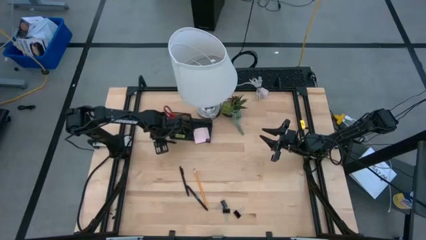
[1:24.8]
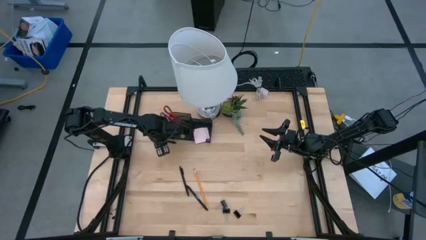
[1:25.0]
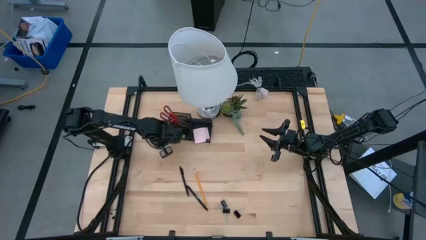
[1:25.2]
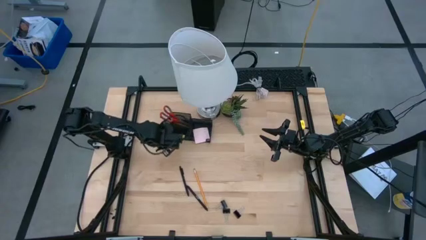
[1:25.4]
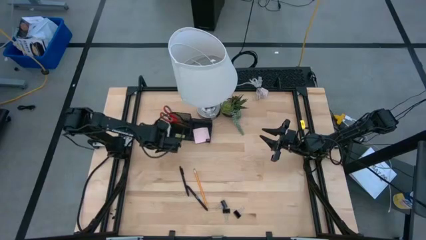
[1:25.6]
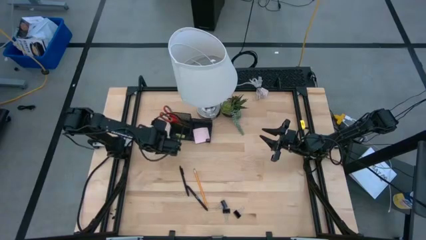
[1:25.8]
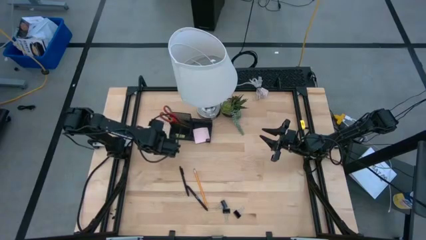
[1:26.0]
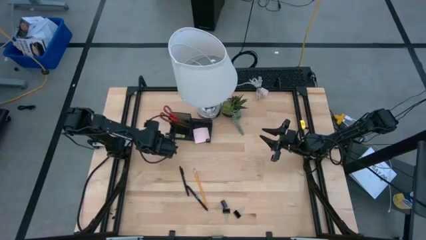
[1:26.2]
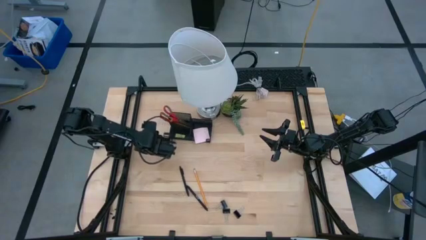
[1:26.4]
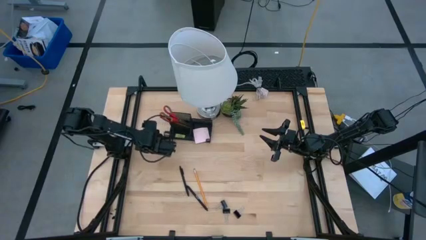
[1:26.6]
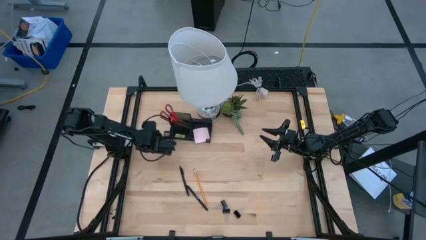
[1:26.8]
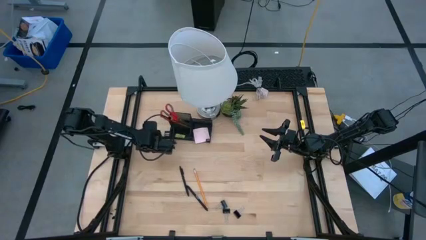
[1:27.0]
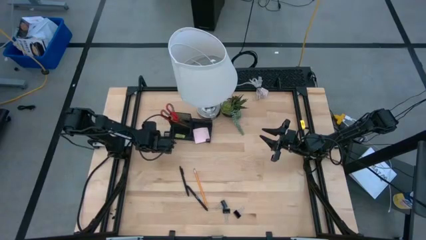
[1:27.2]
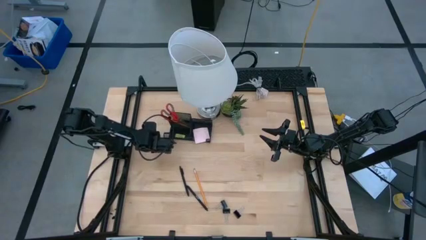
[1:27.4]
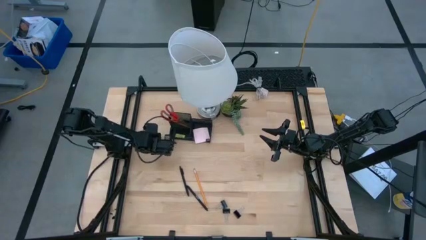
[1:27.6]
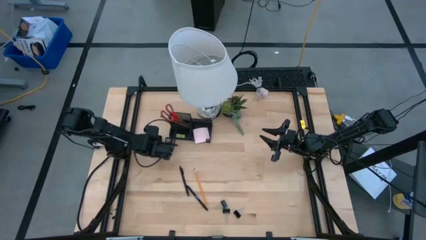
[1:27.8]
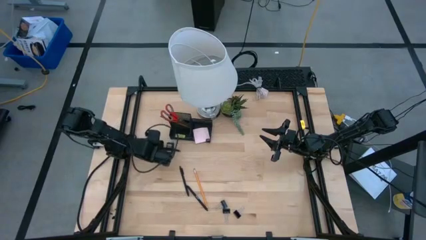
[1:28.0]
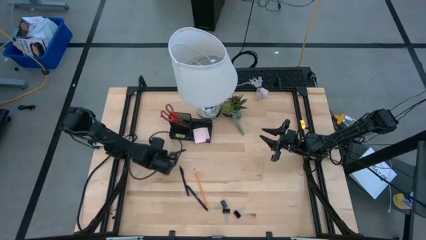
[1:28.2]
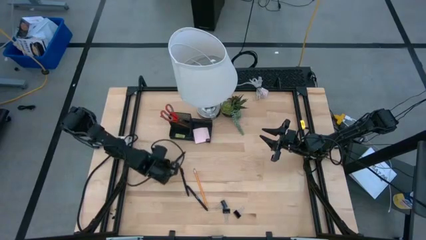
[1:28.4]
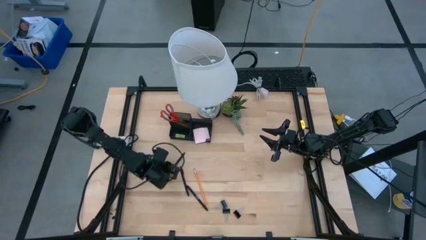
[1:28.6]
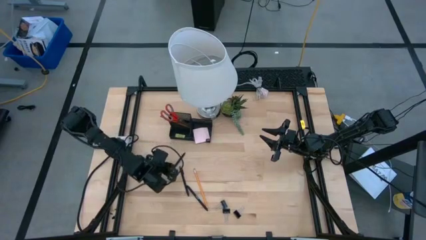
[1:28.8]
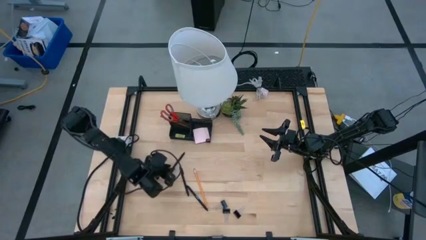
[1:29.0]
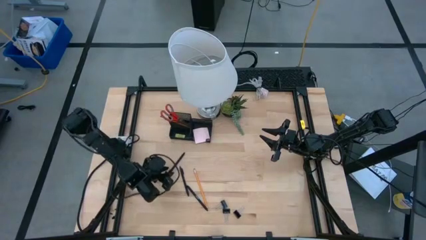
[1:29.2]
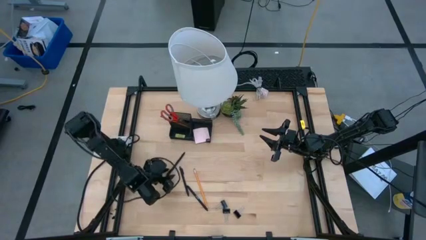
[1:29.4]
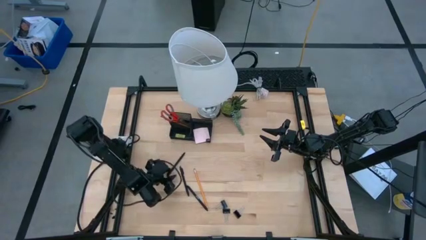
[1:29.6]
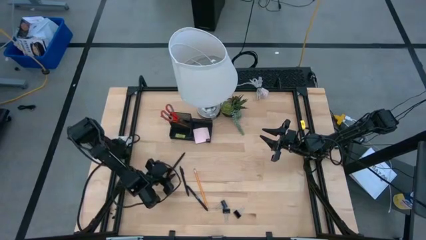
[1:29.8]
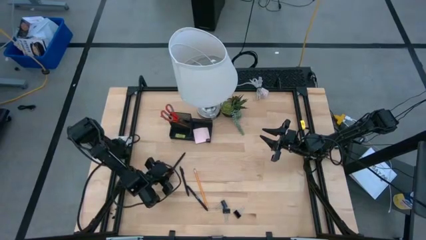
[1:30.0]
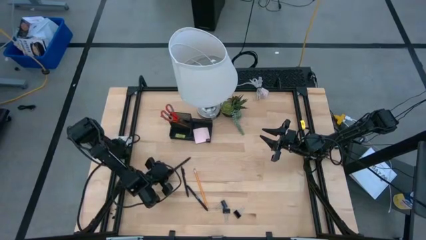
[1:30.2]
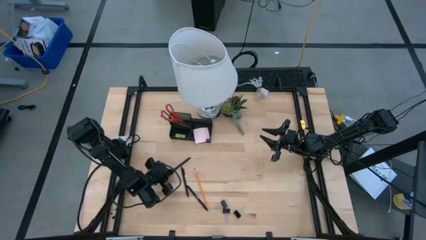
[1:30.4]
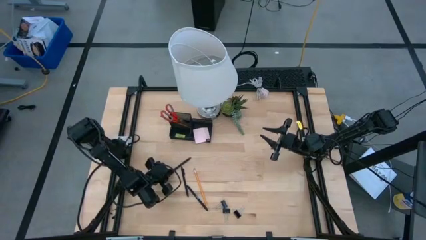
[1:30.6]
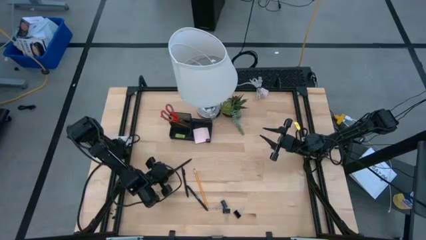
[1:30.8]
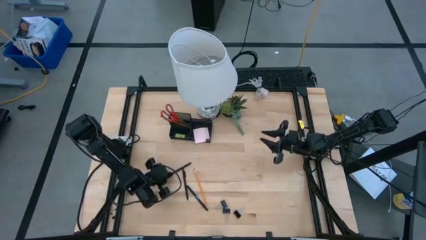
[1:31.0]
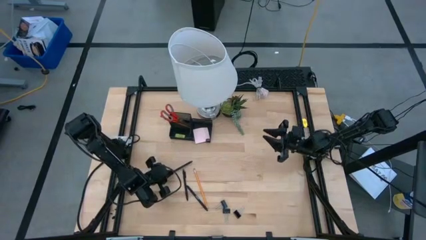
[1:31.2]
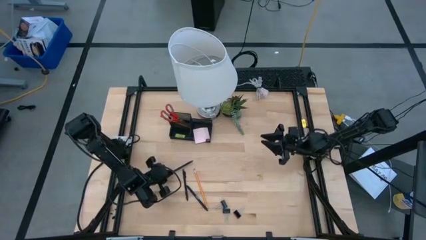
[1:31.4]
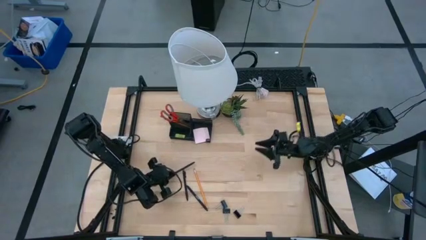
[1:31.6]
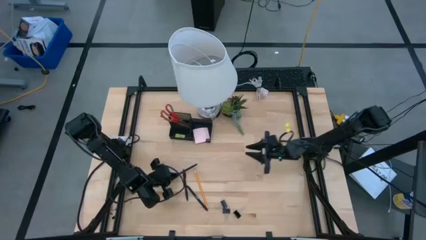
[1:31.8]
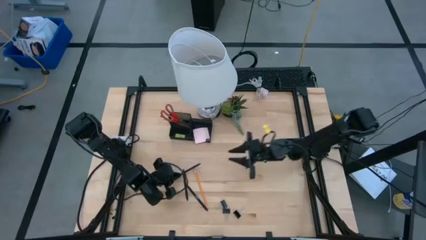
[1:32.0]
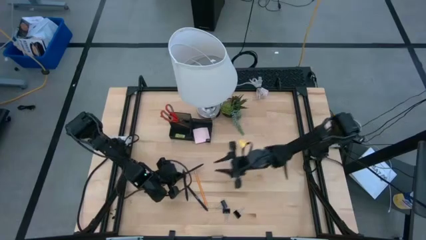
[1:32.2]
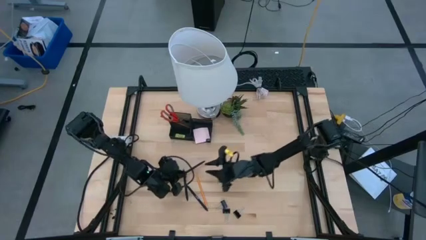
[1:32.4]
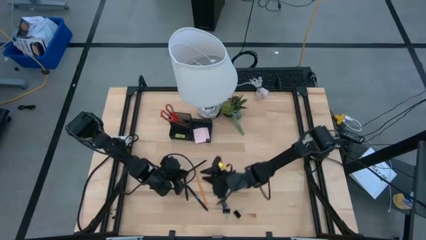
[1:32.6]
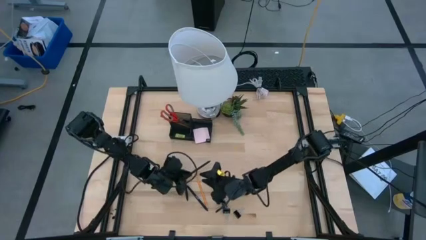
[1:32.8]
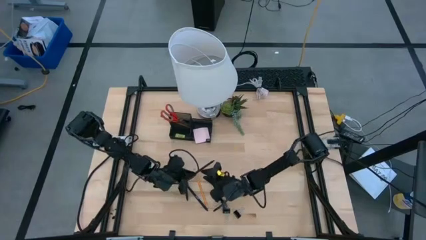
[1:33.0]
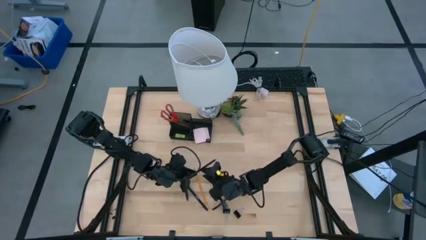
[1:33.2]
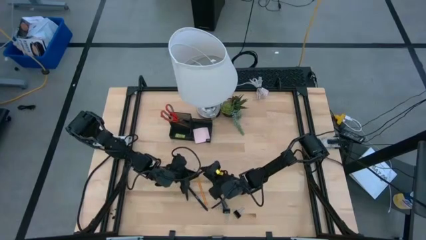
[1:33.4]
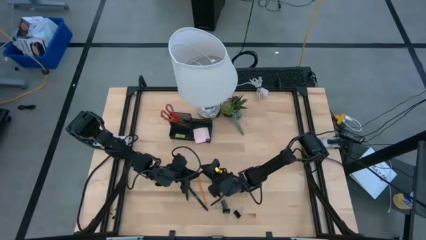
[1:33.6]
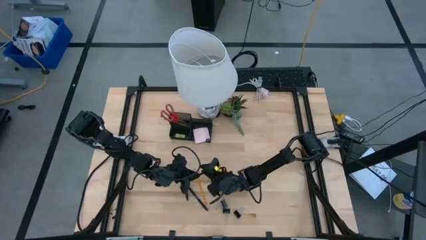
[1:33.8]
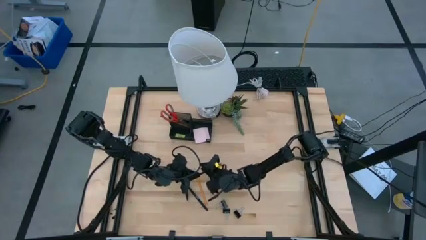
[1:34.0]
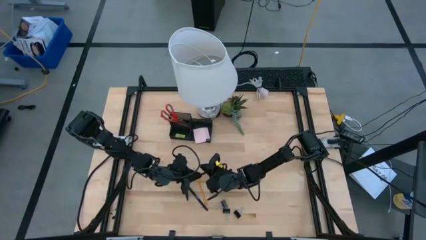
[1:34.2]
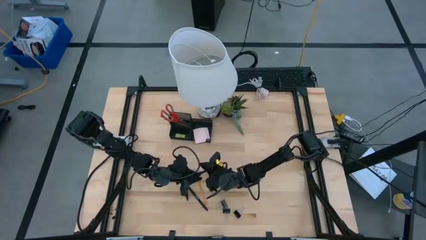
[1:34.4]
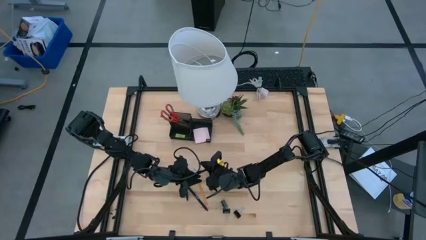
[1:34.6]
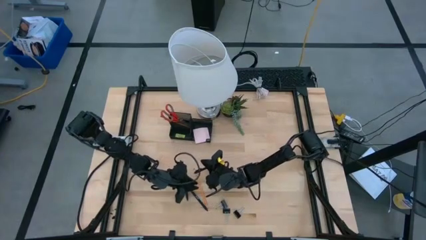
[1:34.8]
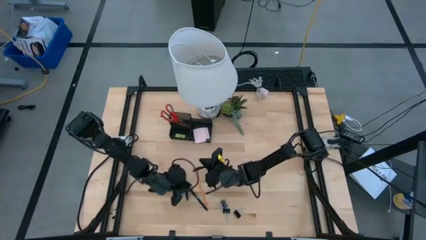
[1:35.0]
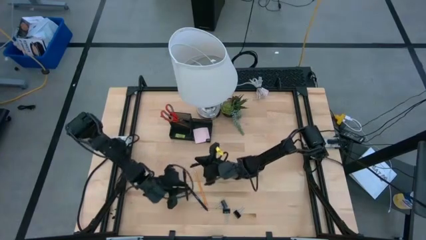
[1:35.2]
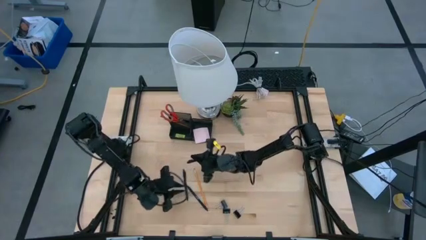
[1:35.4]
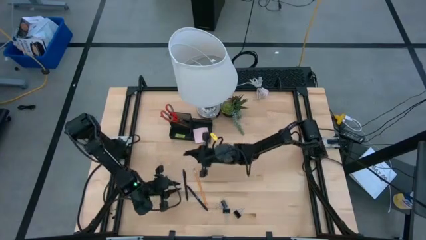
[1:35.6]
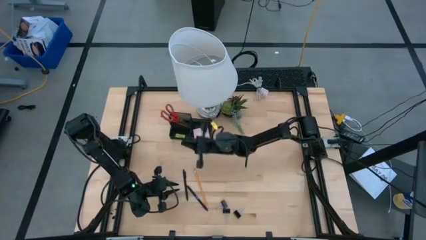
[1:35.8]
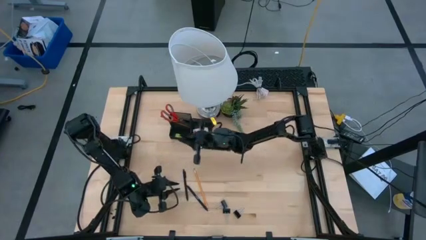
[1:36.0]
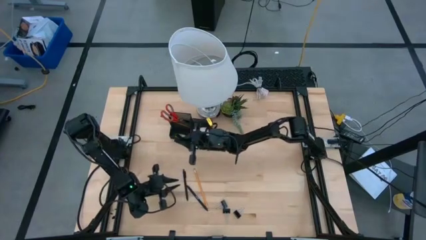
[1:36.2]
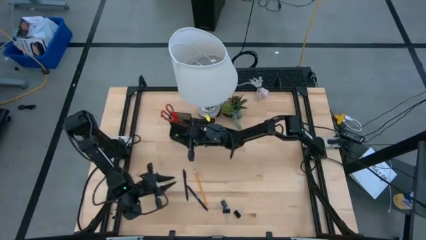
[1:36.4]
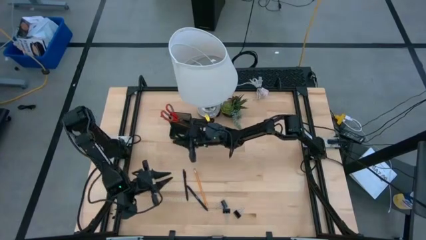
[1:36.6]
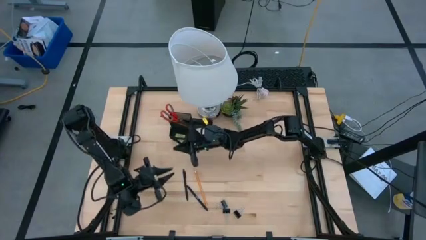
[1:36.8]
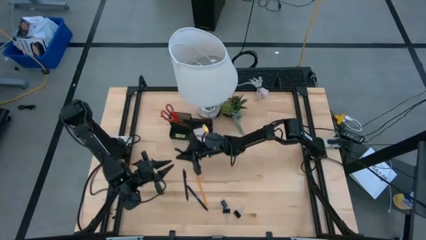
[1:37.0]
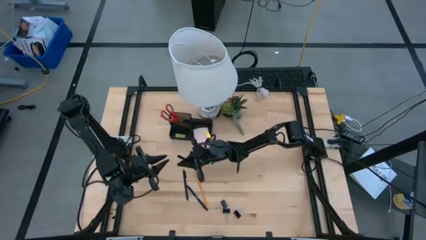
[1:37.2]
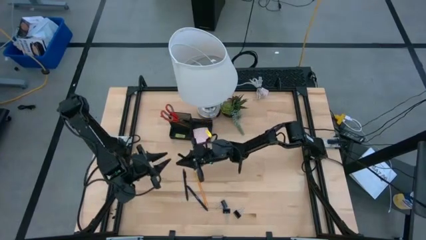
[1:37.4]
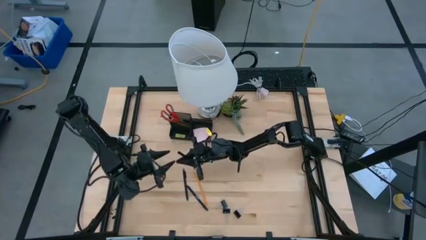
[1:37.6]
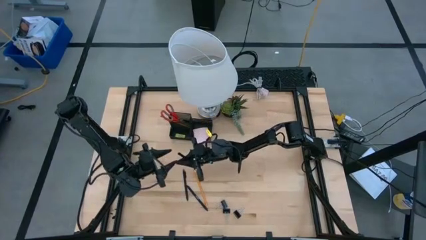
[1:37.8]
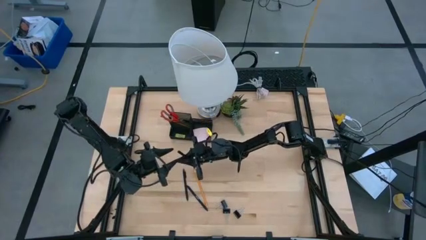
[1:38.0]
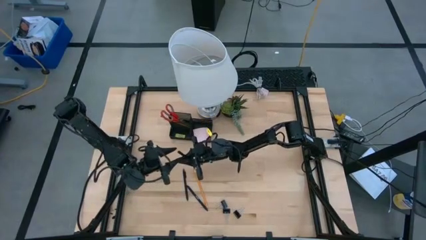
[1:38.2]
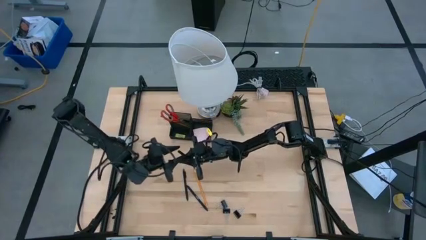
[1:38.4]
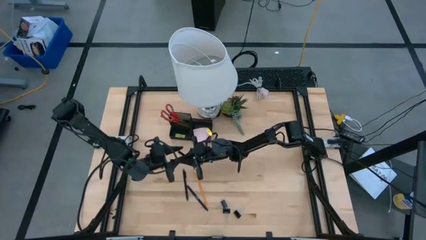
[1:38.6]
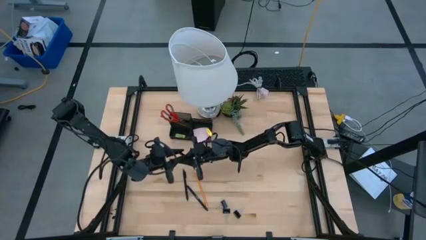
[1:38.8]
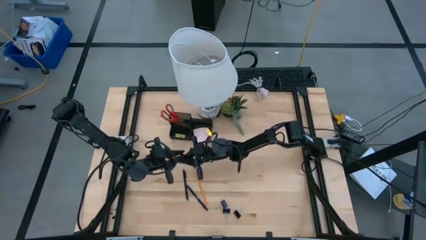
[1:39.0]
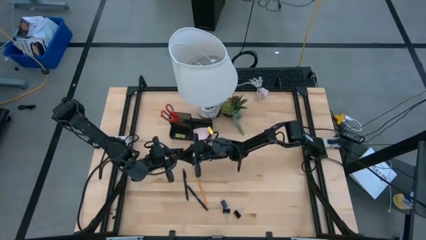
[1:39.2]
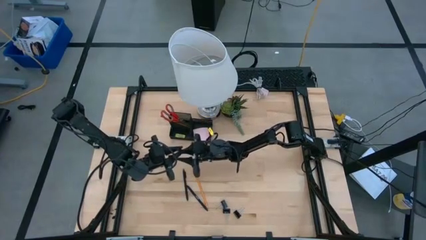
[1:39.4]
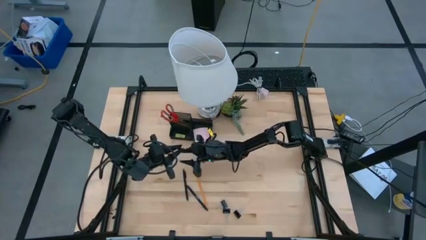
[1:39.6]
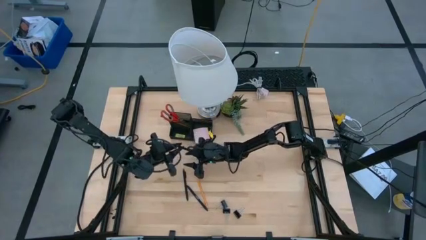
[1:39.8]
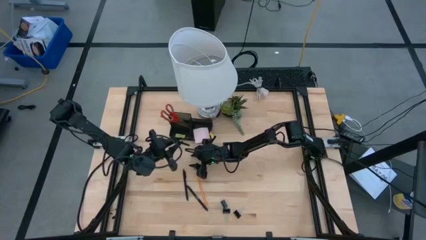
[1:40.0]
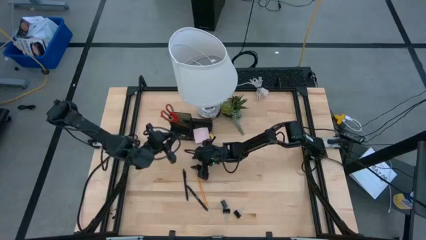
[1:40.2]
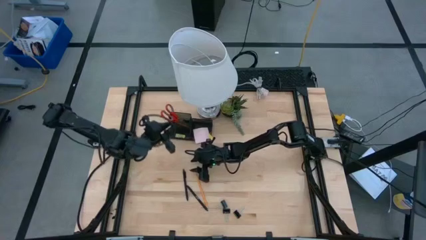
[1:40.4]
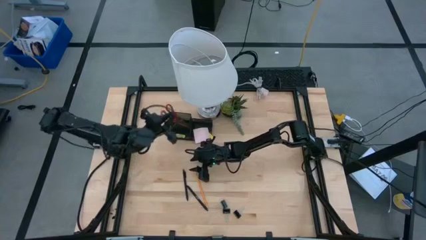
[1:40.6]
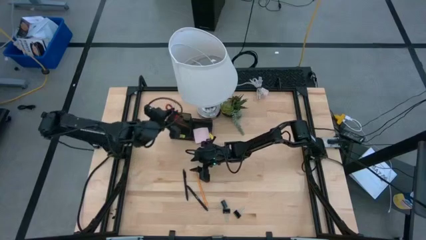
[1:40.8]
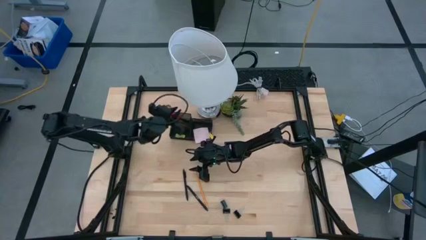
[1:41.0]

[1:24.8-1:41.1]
Task: Pick and place office supplies into organizer
Put the black pen into the black desk organizer

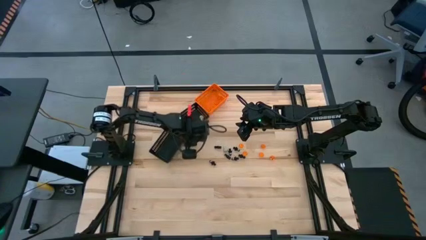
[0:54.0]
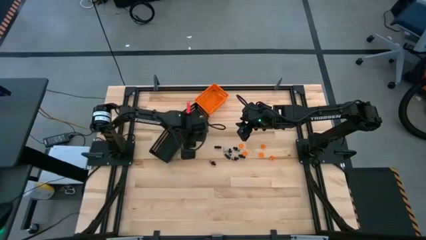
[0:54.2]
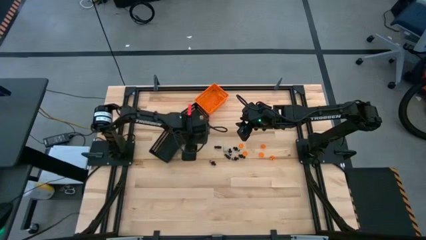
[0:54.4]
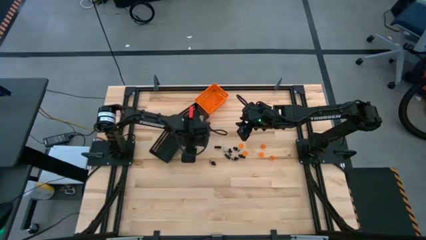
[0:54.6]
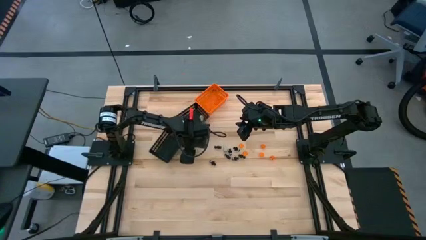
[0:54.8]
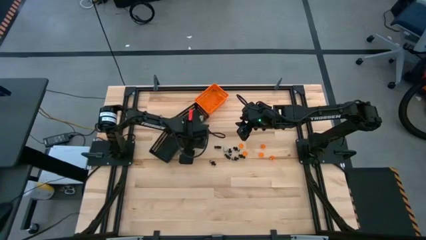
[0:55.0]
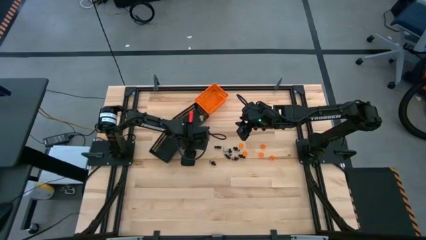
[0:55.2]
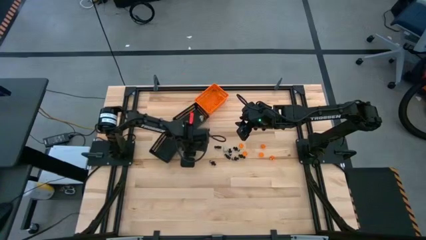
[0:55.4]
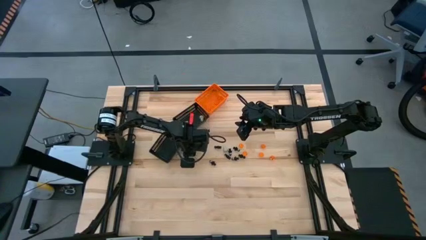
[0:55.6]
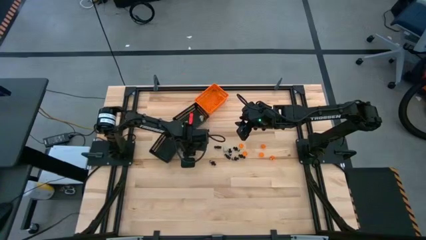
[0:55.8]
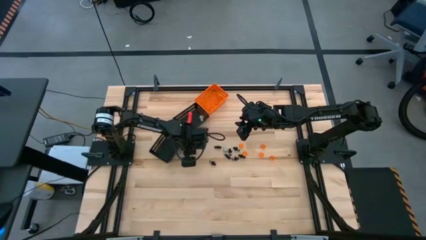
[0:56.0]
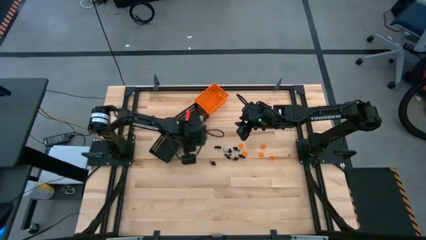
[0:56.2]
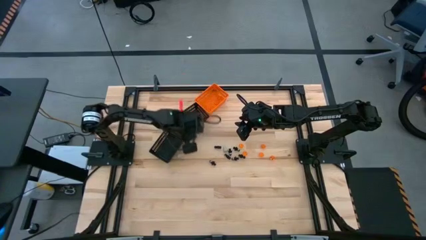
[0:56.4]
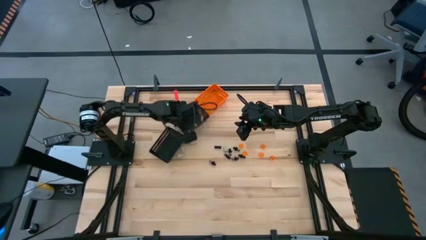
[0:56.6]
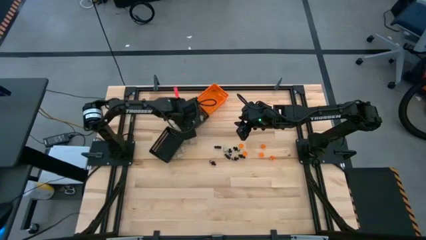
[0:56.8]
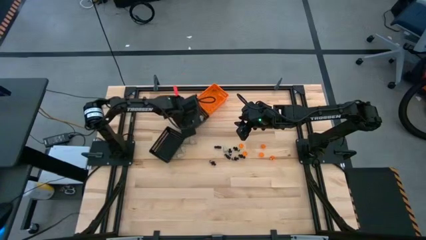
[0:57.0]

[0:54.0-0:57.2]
Task: Sort Halloween decoration
Put the white skull toy into the top black bin
